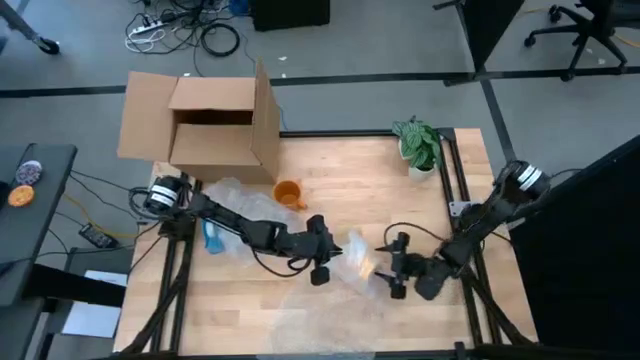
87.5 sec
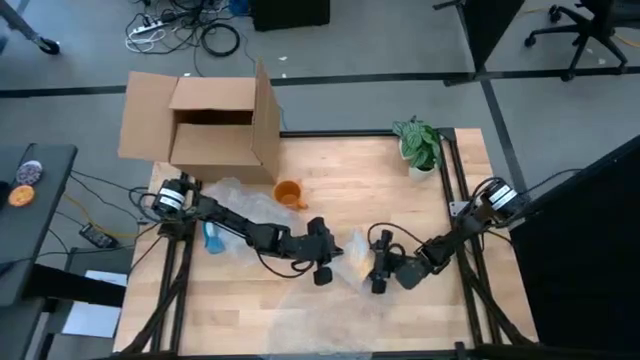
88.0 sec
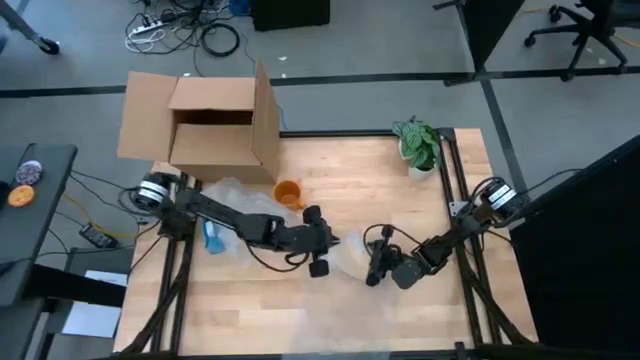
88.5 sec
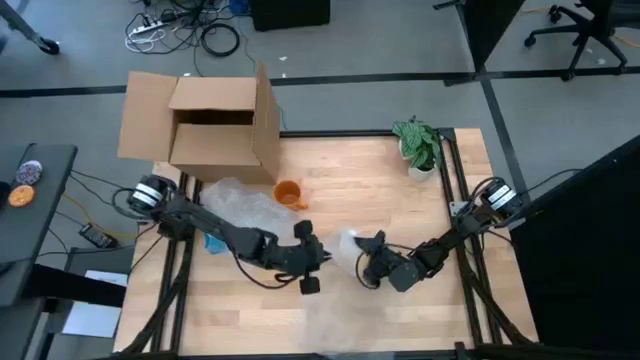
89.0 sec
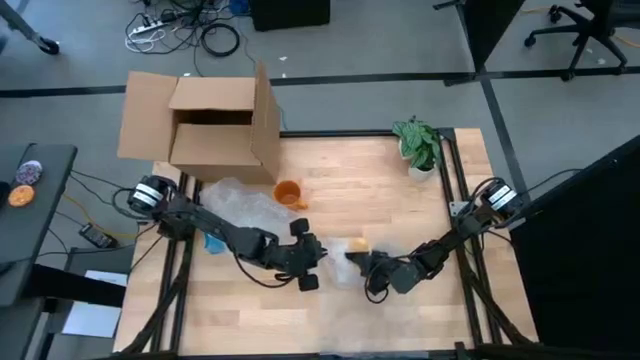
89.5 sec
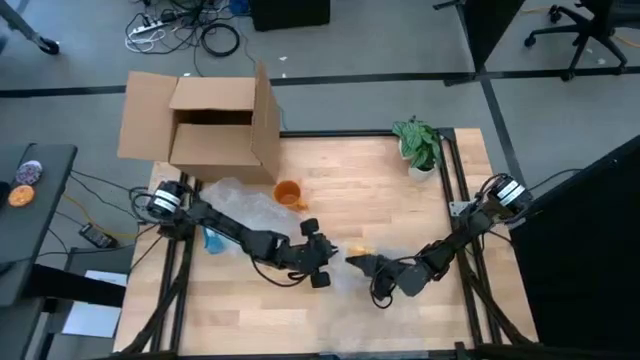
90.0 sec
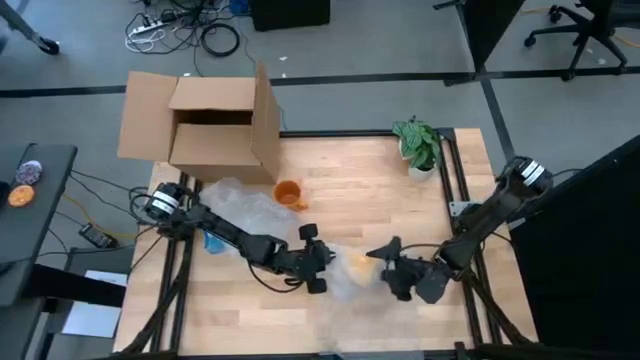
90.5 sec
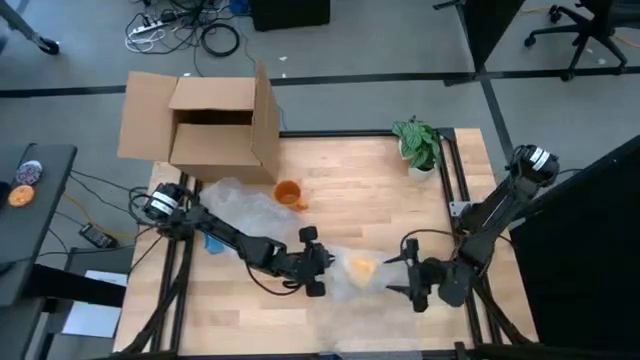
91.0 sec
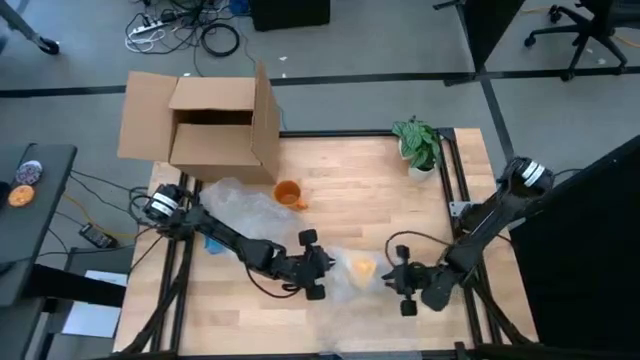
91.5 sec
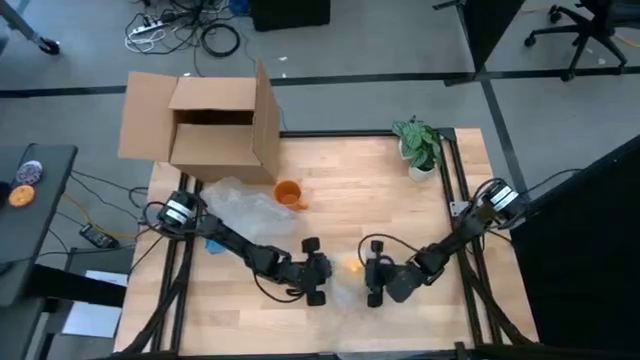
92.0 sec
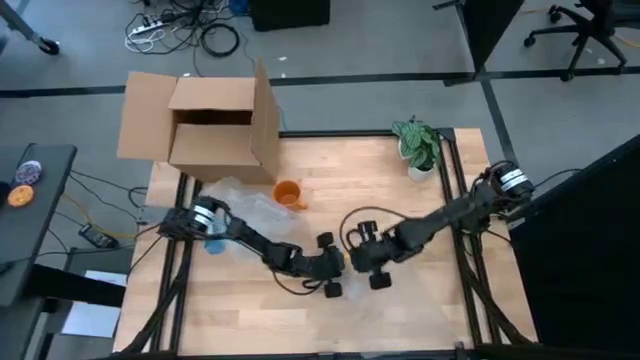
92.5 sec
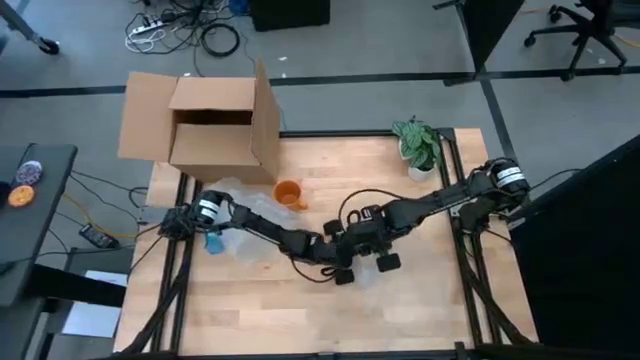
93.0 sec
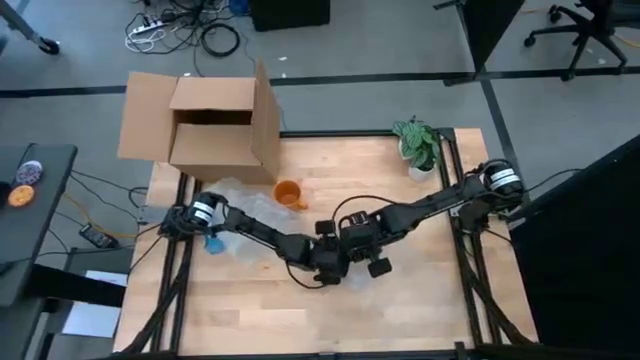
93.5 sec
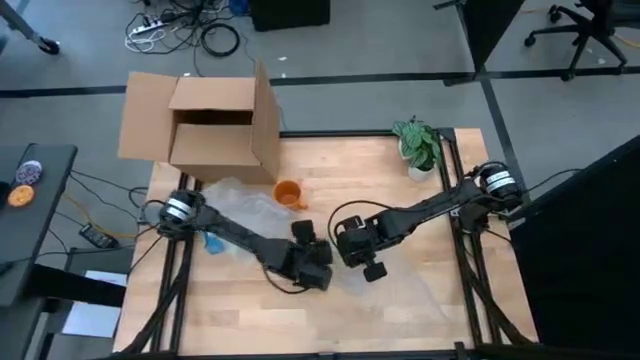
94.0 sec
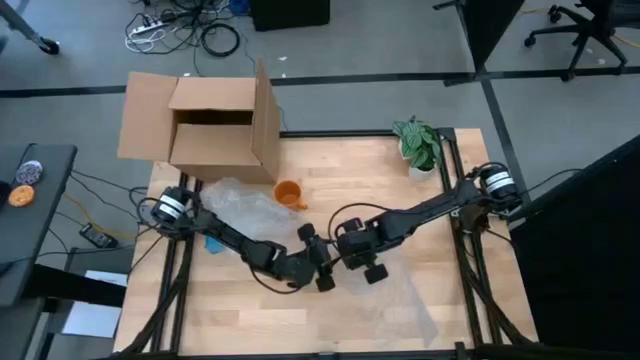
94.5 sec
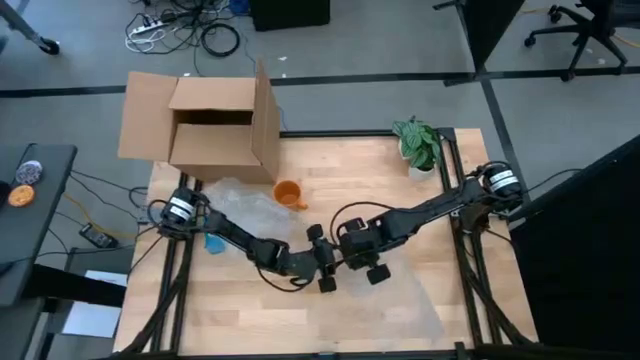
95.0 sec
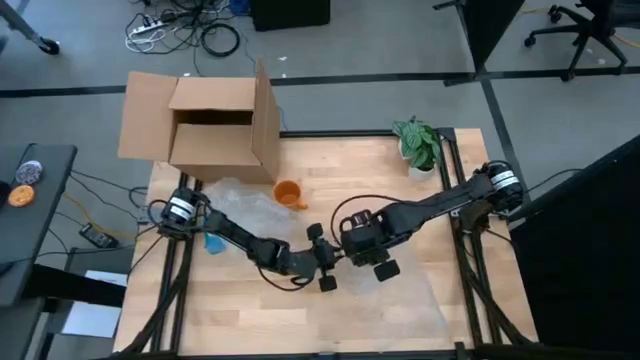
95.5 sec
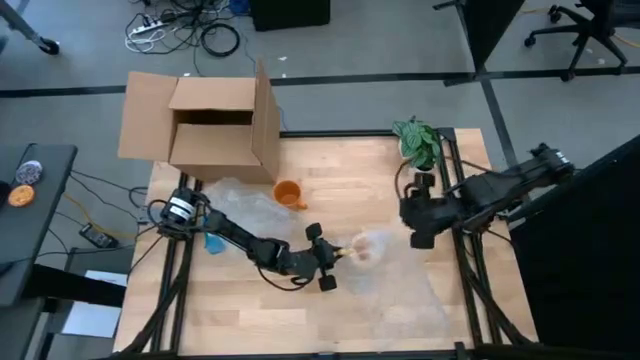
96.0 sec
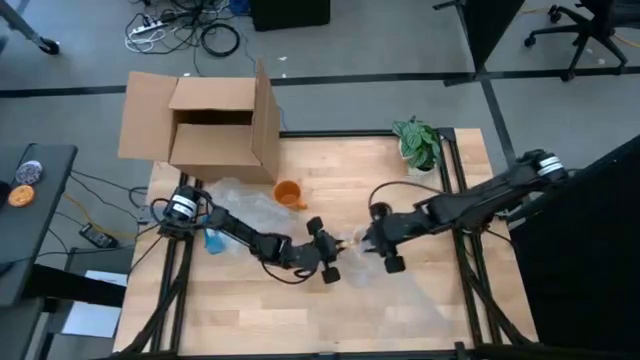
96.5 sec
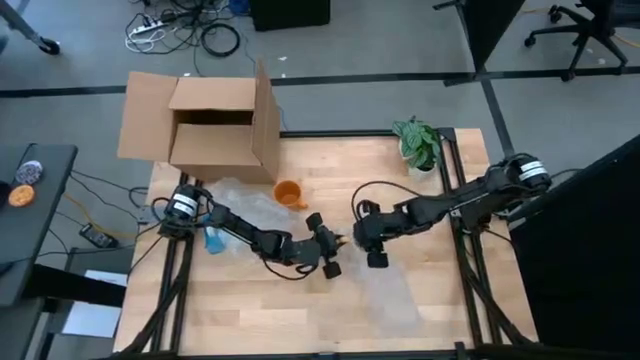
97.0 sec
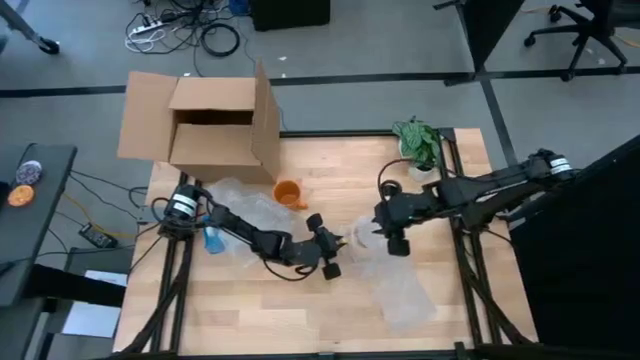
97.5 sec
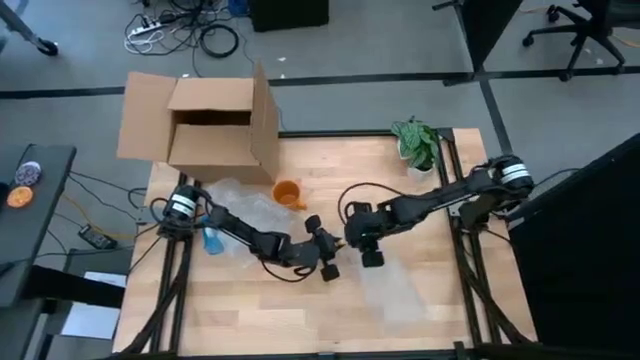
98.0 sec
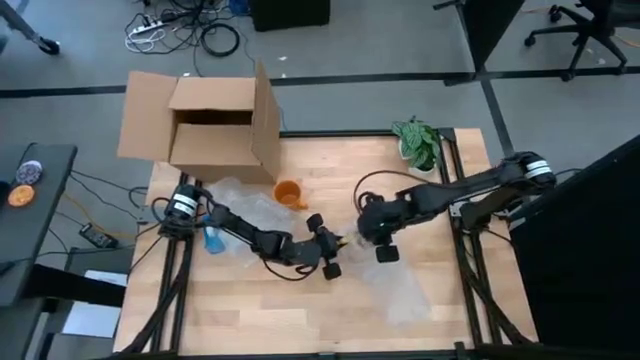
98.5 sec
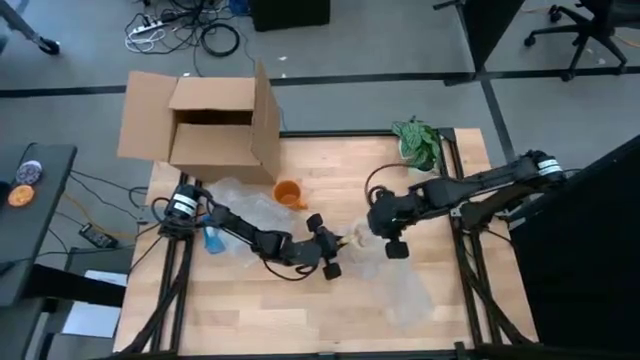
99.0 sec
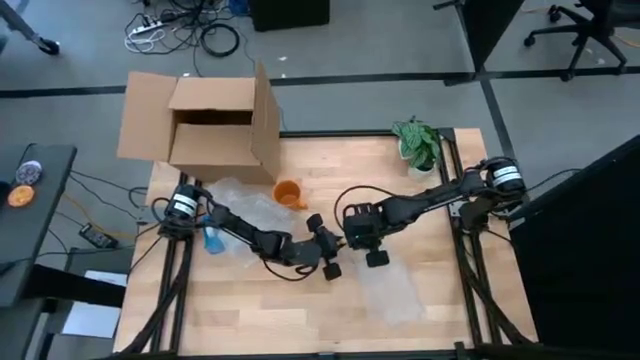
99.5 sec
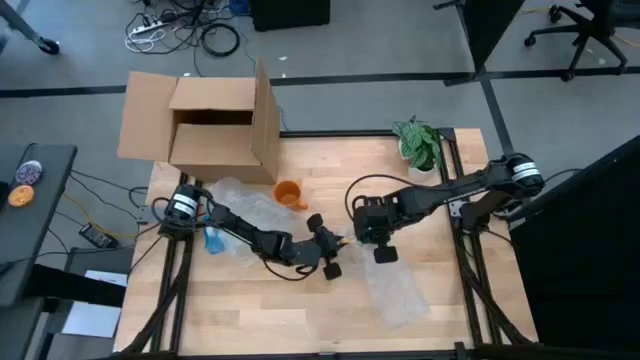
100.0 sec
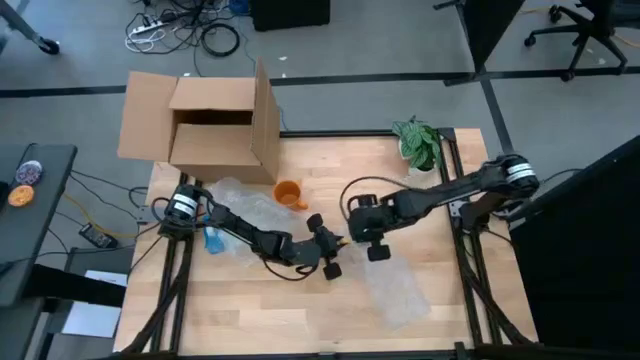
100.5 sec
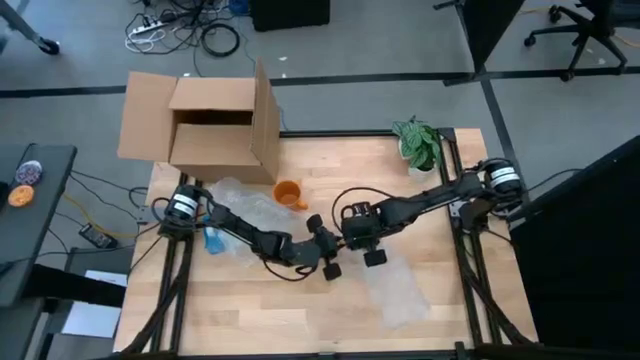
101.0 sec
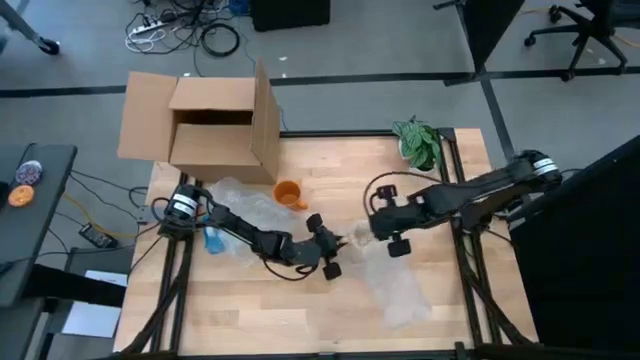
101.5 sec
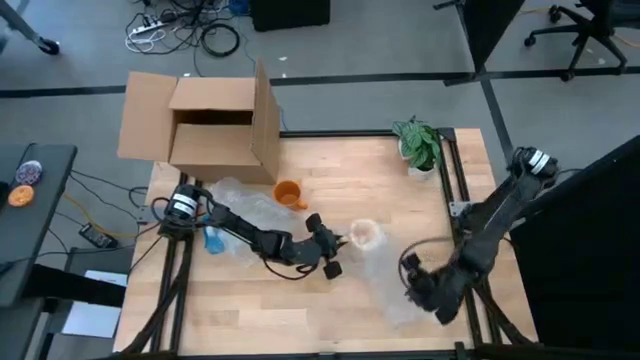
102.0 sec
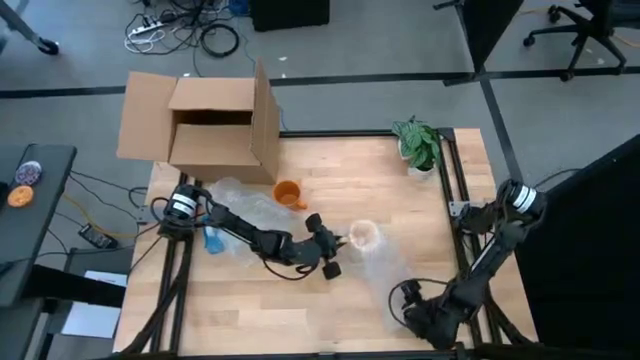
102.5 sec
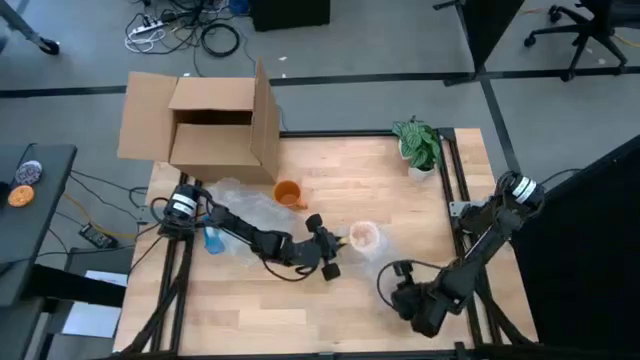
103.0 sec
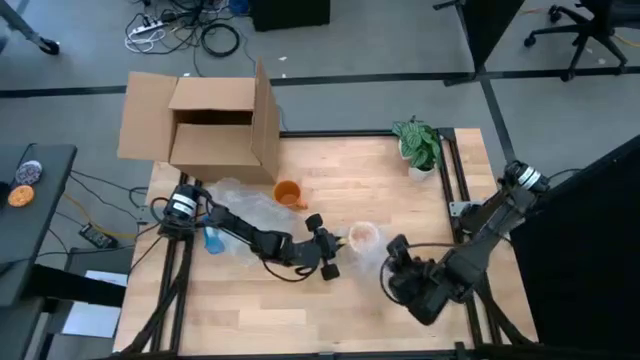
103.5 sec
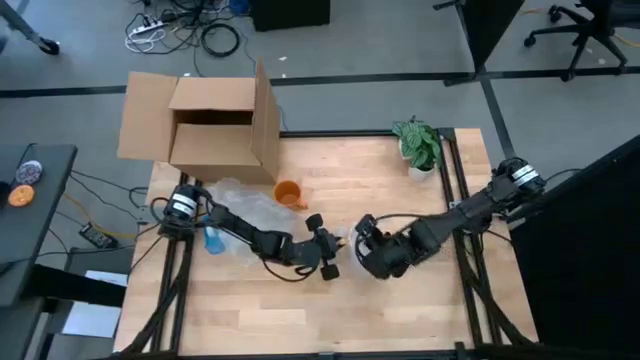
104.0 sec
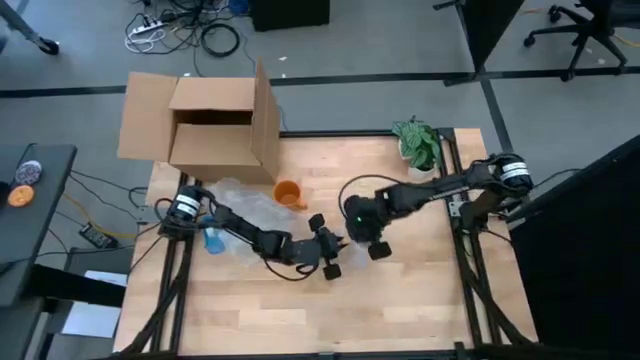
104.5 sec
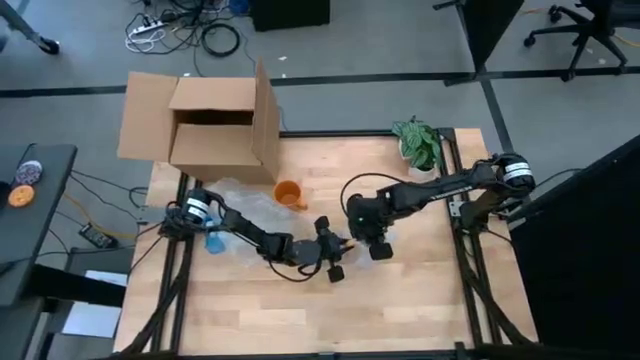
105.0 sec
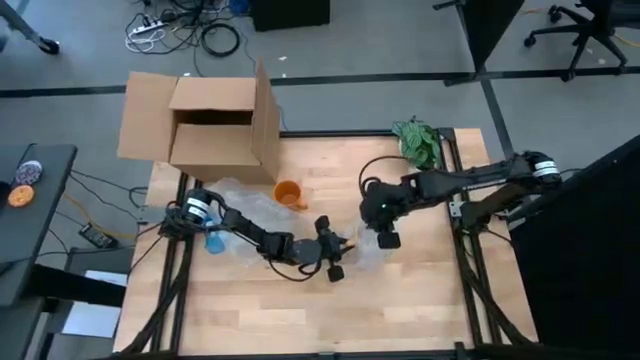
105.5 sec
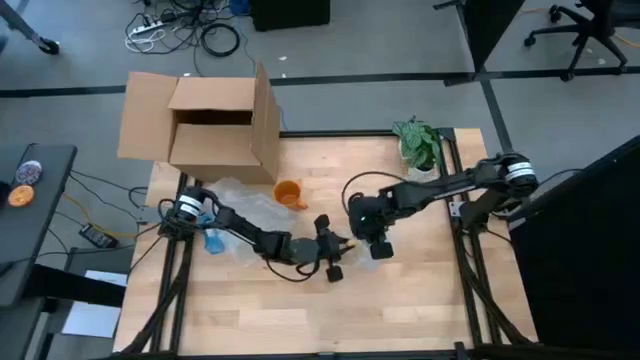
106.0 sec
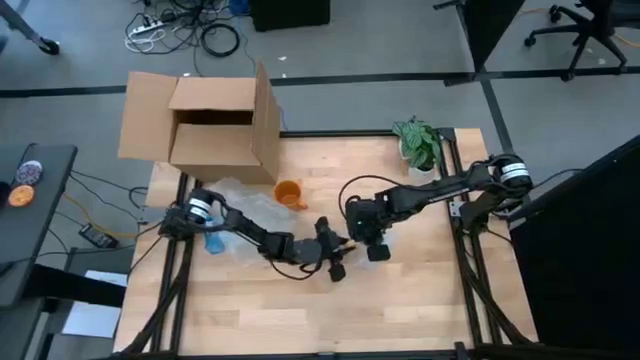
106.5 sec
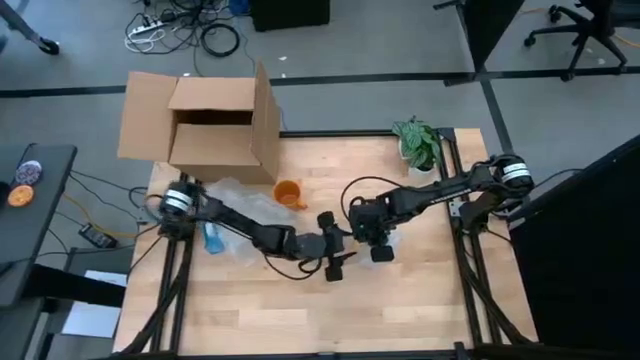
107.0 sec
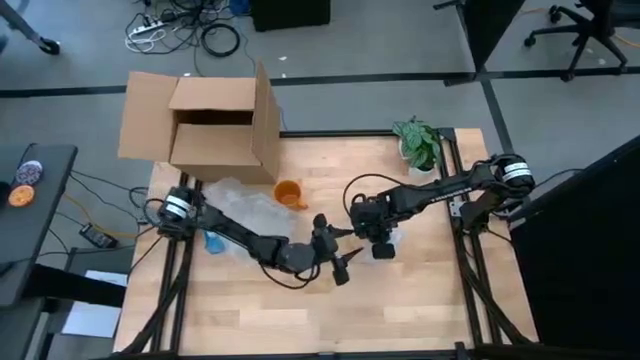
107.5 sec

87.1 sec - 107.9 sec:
Task: wrap mug
Wrap the yellow mug using the transparent bubble wrap
